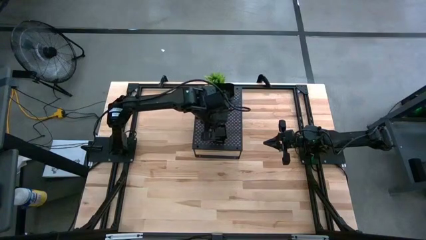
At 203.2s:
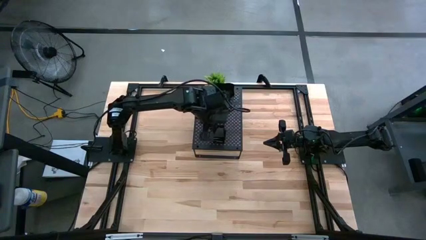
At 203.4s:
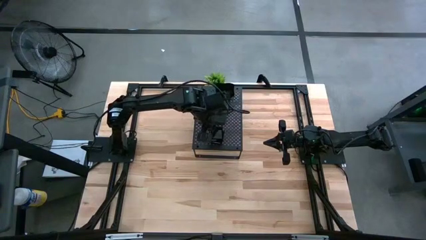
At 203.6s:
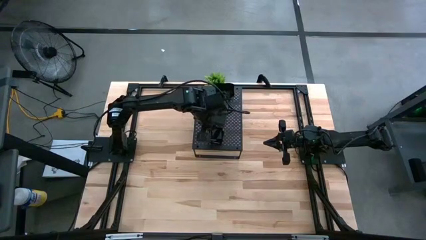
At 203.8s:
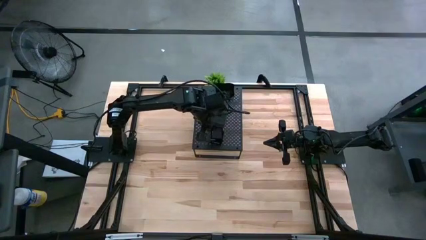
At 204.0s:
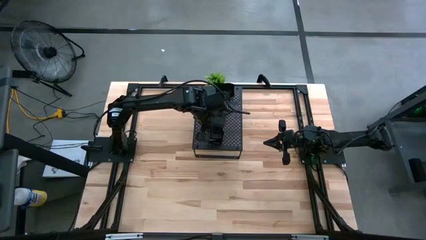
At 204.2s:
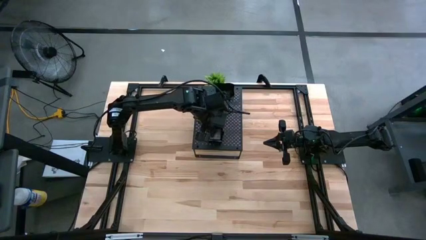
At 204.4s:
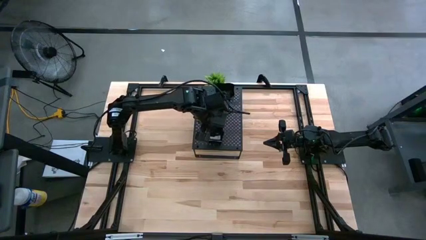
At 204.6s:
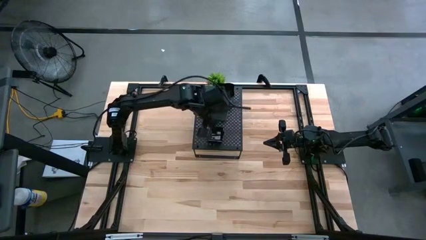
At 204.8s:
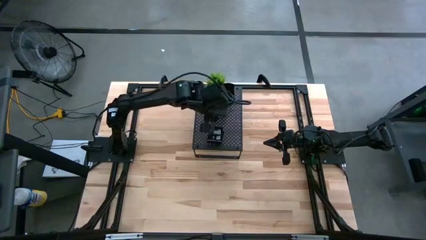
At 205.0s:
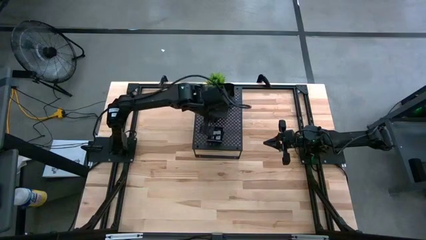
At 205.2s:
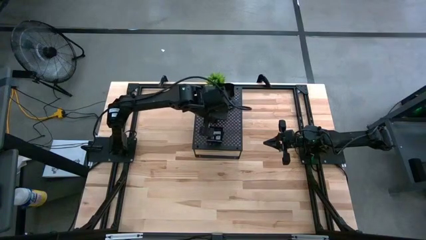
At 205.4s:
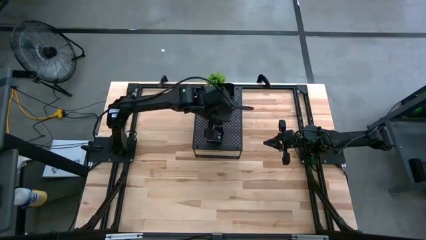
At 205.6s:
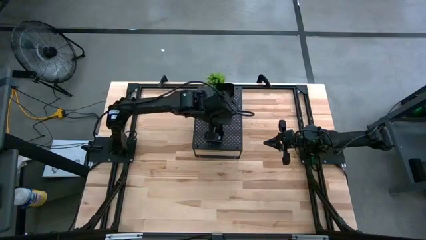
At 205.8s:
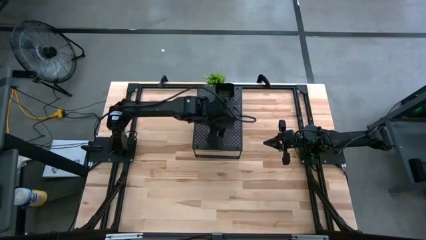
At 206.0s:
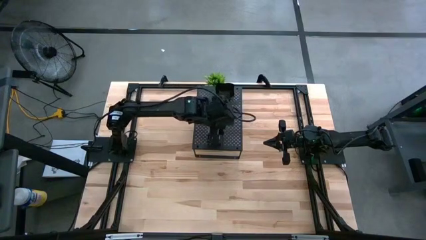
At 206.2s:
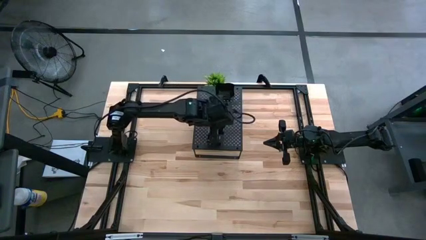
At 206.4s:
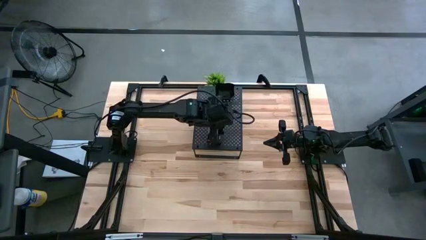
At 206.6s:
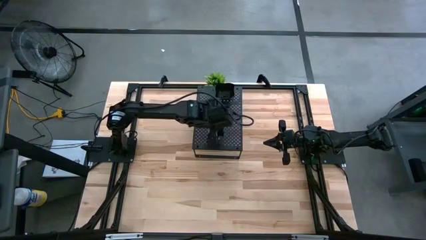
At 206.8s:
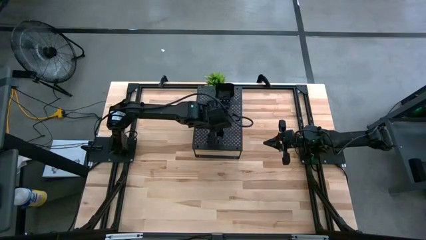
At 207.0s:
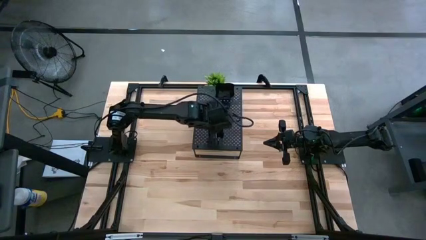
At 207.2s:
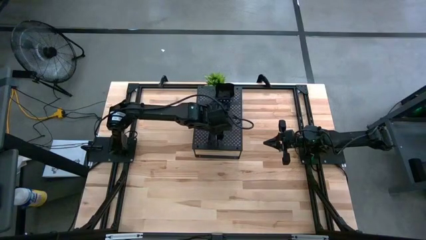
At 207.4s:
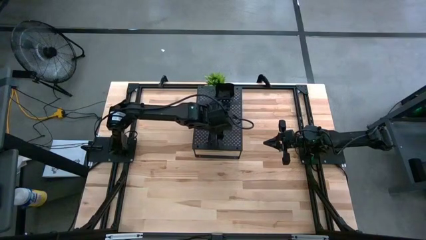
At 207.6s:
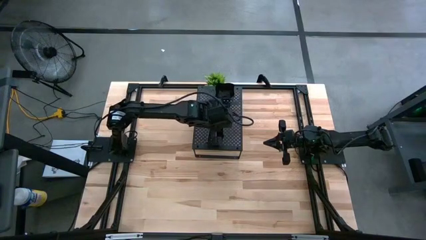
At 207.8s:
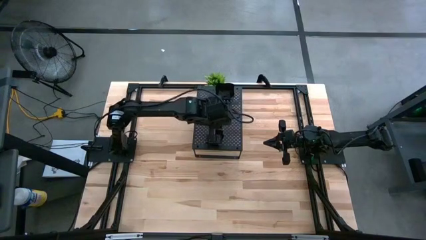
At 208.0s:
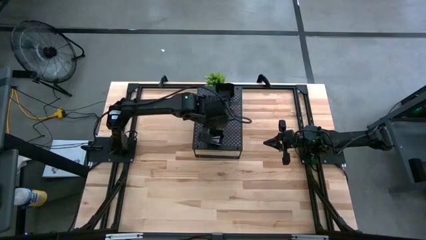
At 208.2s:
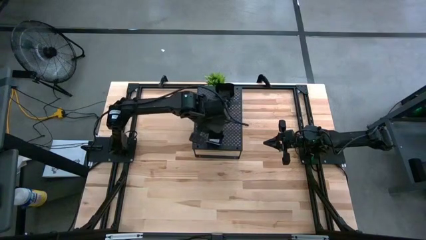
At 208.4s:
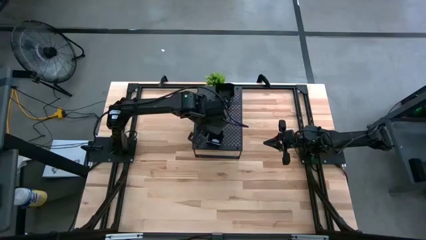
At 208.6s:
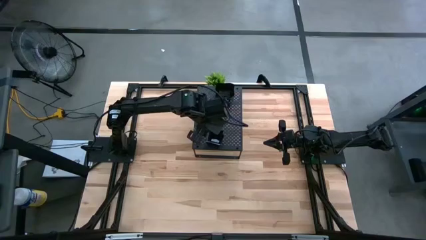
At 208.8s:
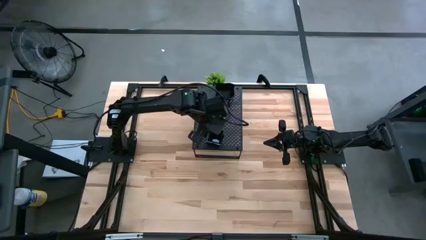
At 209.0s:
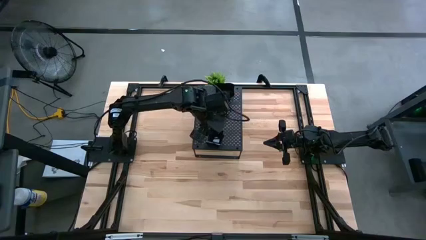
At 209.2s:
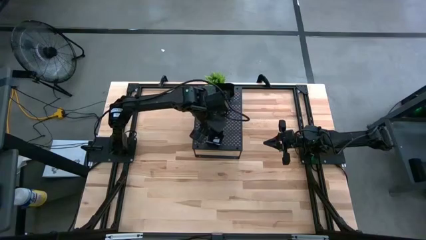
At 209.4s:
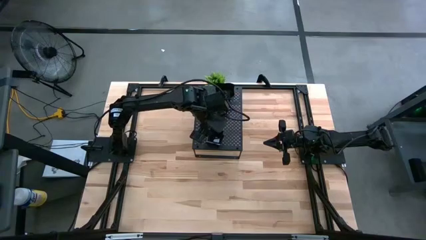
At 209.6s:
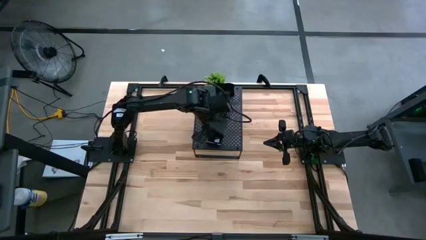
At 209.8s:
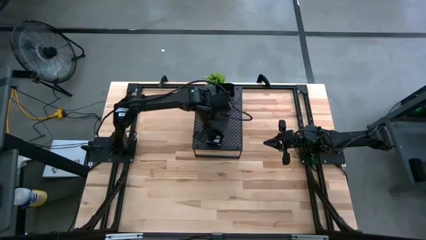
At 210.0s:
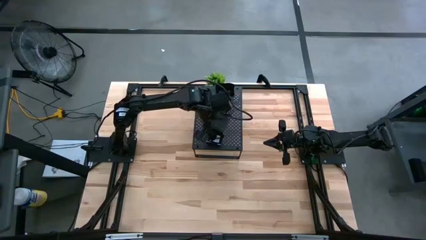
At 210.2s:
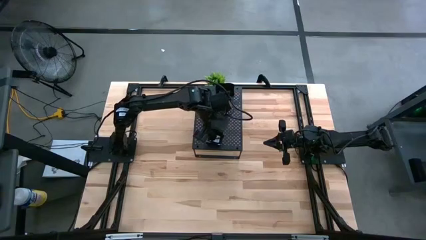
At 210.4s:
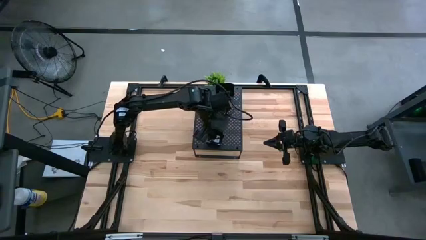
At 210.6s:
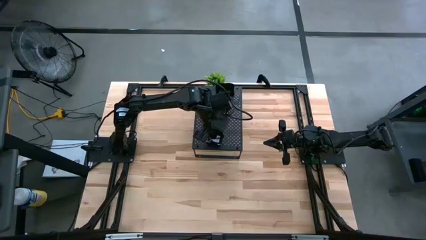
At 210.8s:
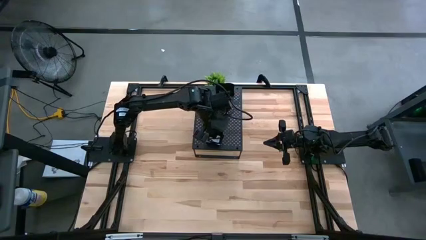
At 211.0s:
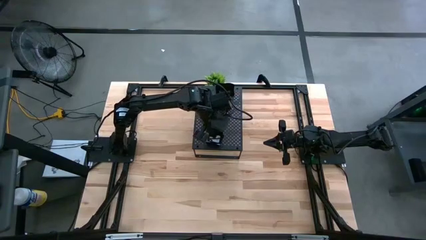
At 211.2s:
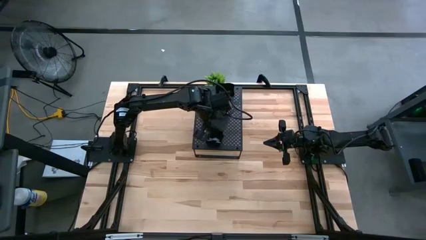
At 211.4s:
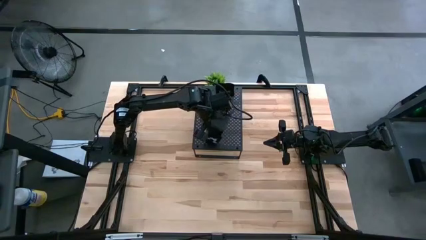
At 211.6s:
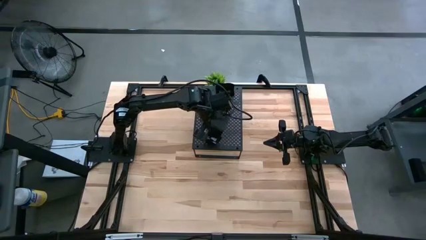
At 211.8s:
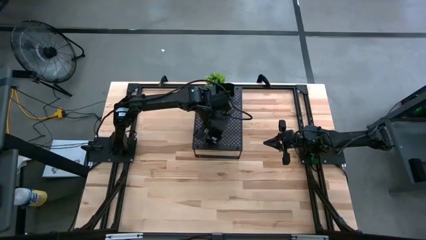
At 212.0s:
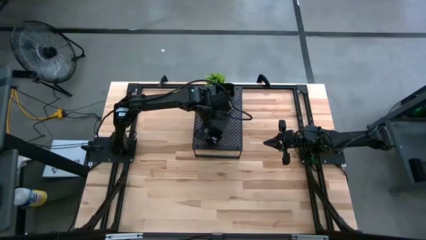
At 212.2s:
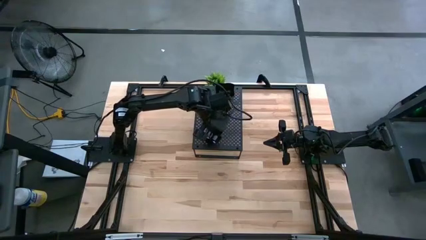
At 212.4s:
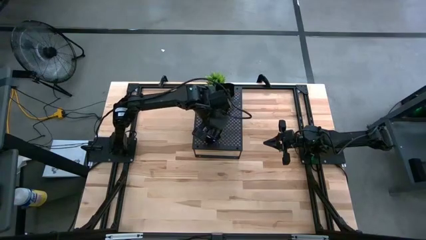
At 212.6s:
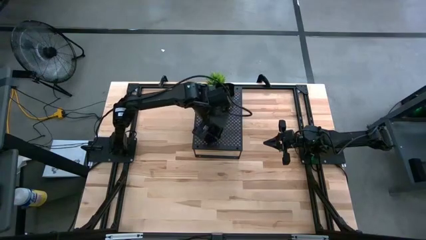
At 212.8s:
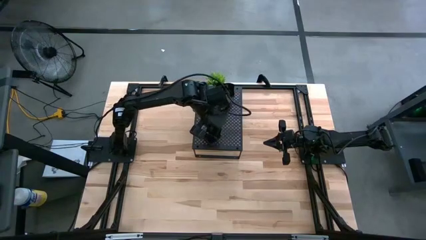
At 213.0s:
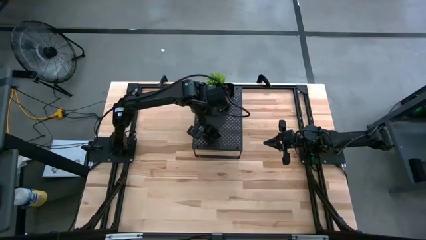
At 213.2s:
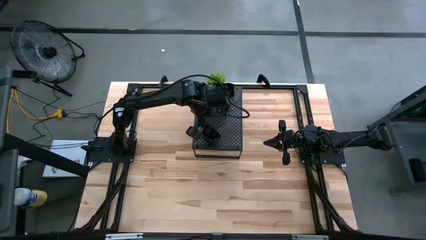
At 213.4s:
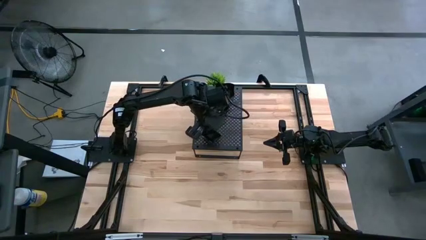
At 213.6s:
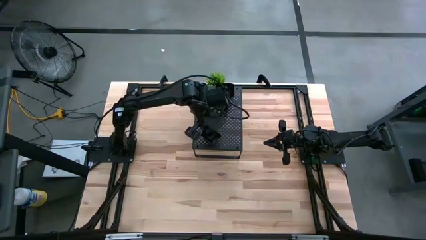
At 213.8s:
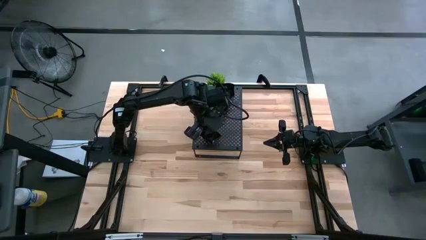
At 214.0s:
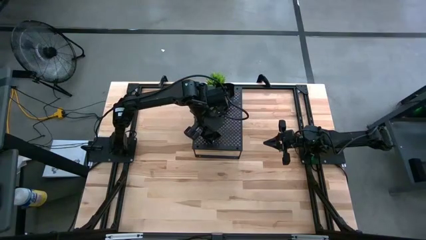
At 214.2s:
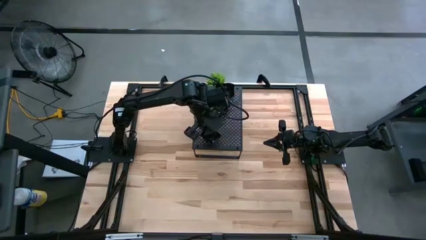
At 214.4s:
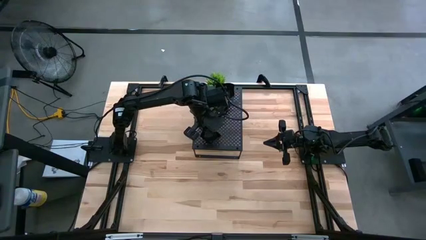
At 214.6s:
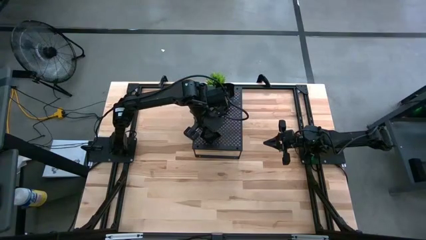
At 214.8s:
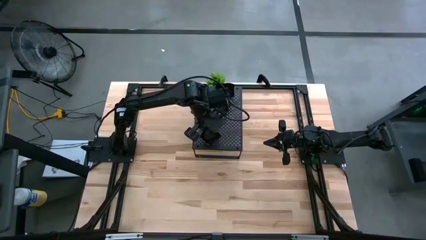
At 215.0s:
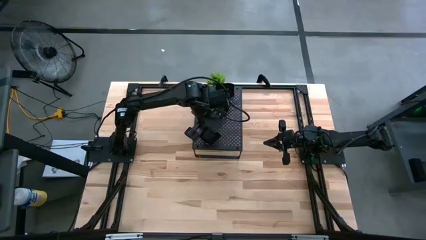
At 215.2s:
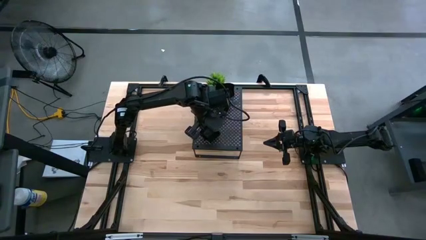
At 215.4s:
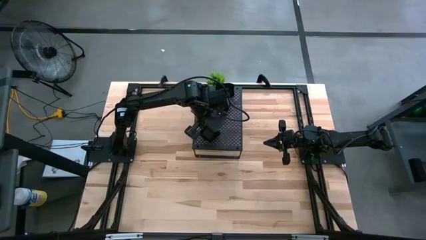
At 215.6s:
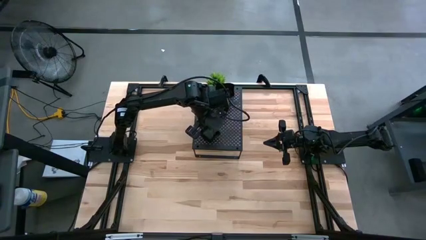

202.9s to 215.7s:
Task: Pick & Place Mini shaped plates
Stack the square plate on top of the square plate on the shelf

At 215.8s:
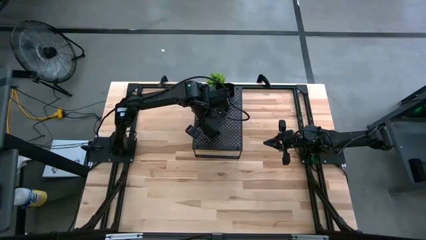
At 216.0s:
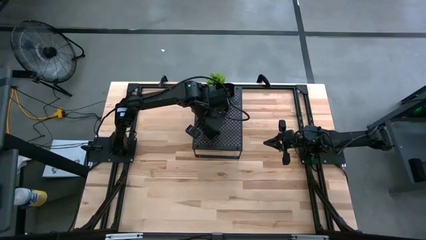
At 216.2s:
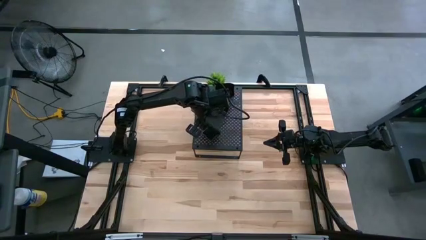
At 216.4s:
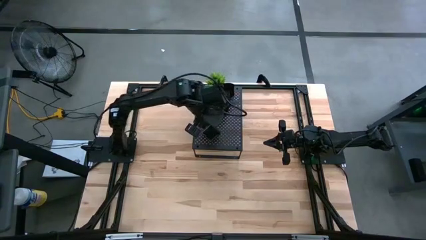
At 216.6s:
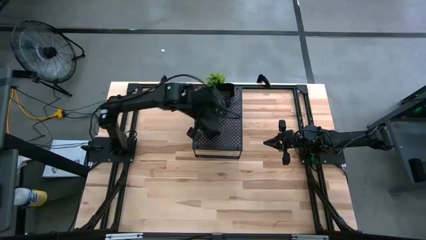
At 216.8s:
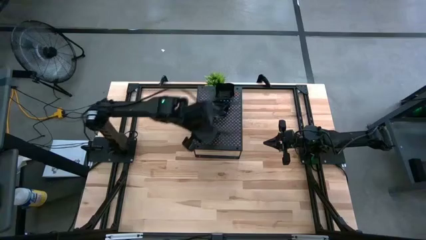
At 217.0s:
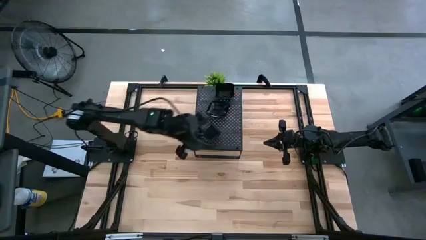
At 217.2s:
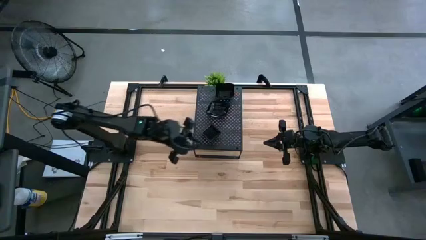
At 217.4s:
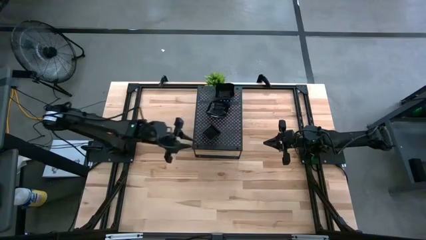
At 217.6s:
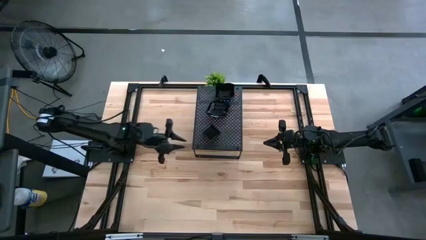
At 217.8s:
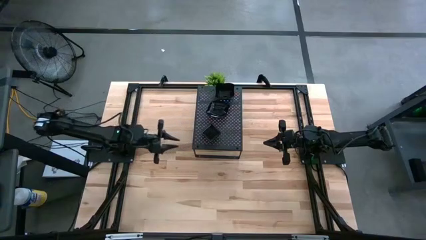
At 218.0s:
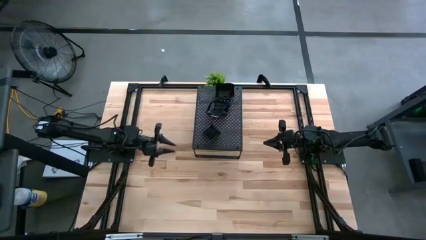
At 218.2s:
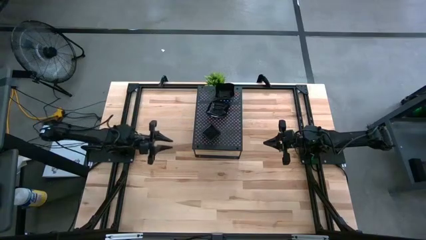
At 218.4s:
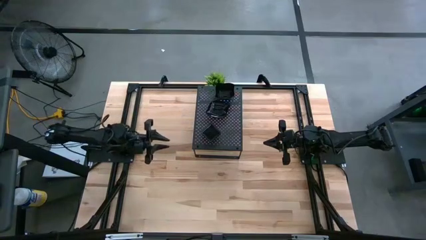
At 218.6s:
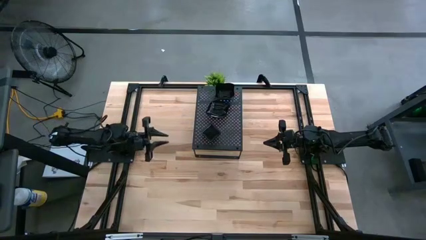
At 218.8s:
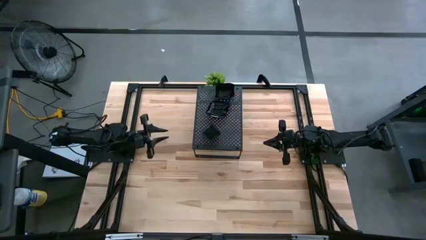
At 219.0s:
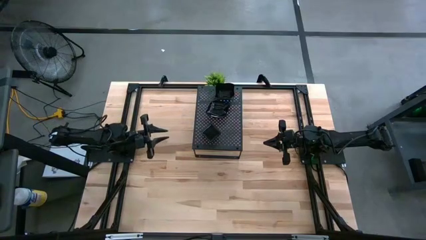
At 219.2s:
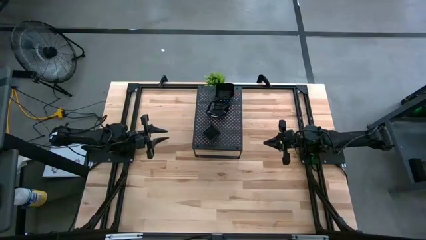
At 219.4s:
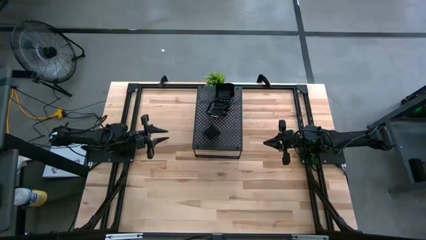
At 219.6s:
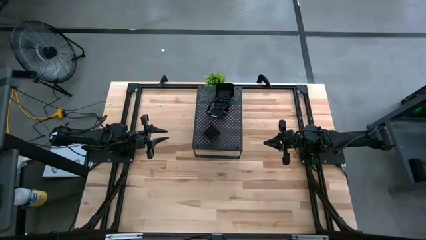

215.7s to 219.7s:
Return to Home Position
